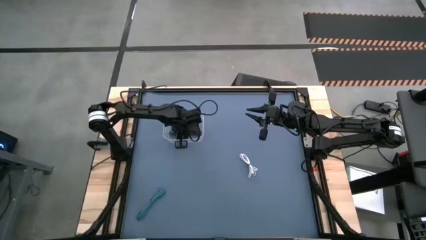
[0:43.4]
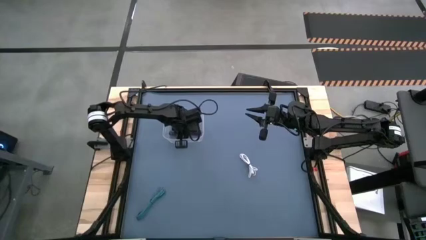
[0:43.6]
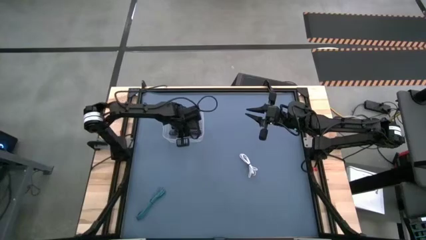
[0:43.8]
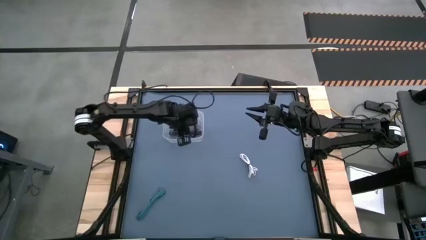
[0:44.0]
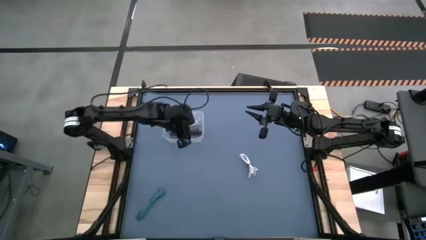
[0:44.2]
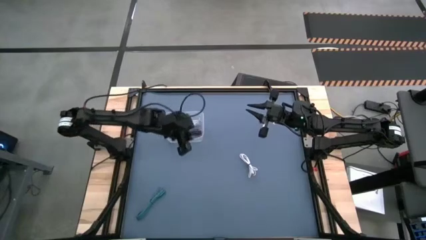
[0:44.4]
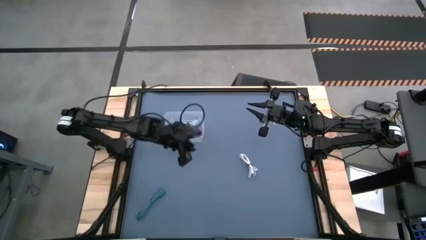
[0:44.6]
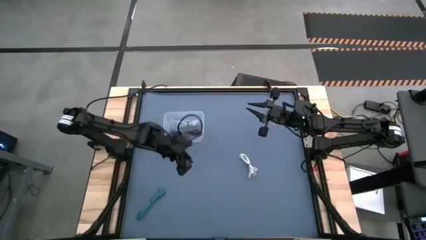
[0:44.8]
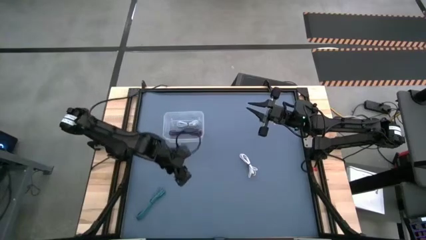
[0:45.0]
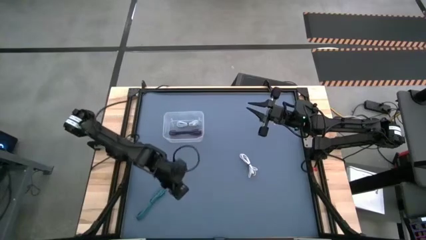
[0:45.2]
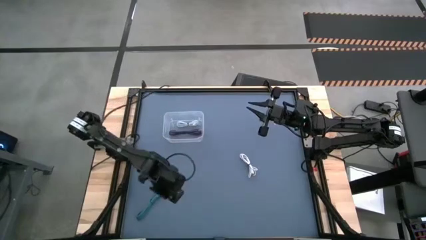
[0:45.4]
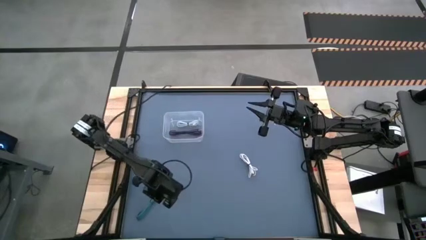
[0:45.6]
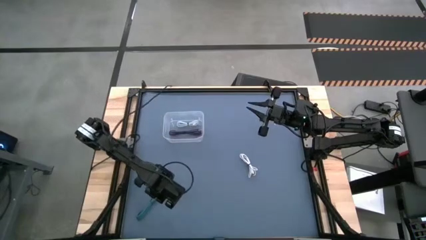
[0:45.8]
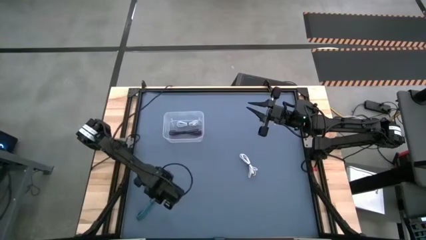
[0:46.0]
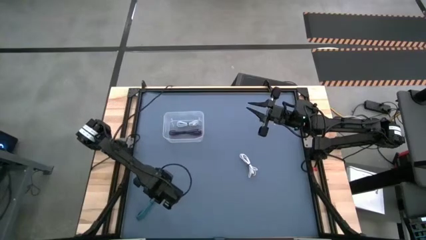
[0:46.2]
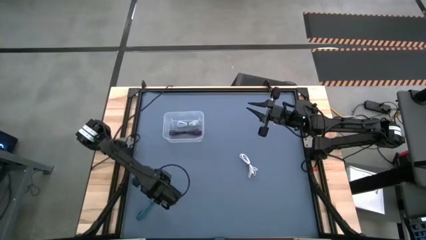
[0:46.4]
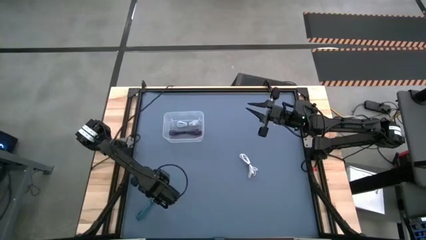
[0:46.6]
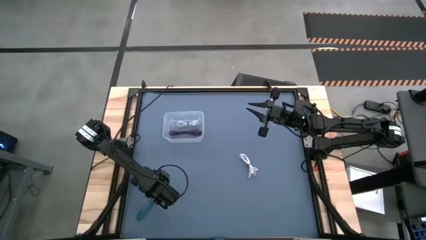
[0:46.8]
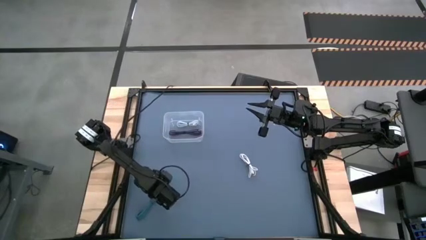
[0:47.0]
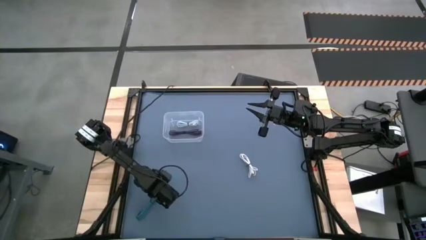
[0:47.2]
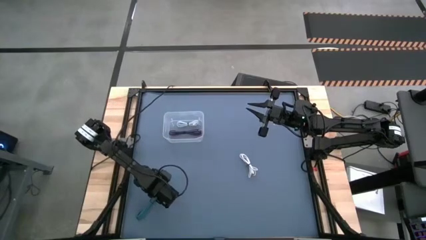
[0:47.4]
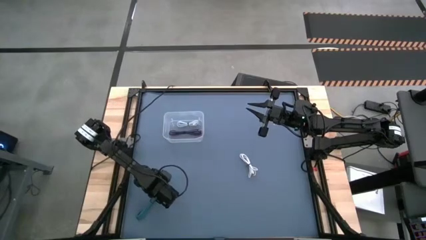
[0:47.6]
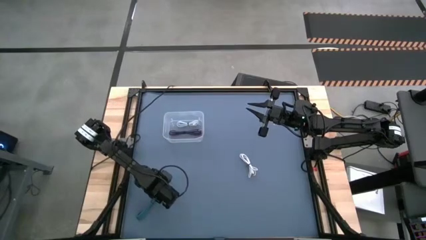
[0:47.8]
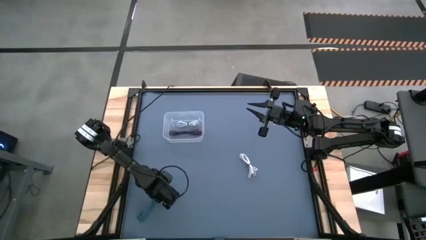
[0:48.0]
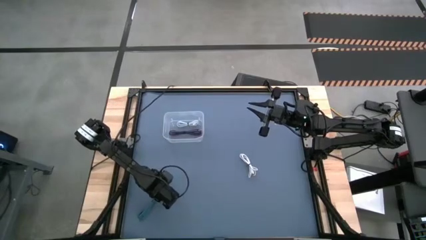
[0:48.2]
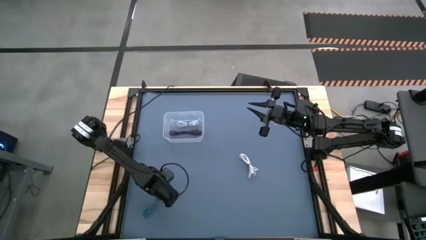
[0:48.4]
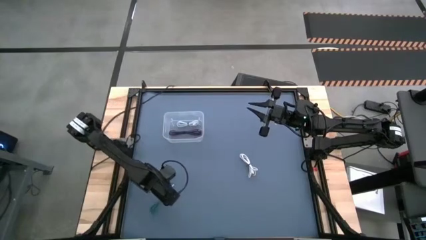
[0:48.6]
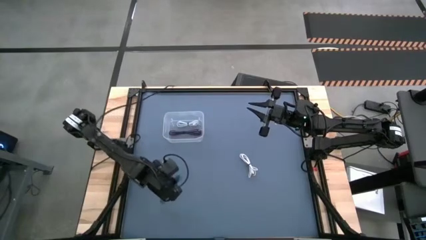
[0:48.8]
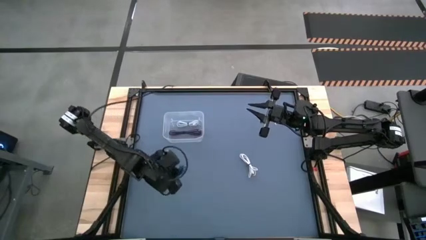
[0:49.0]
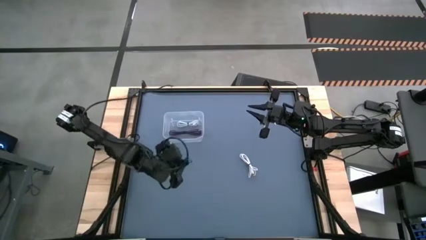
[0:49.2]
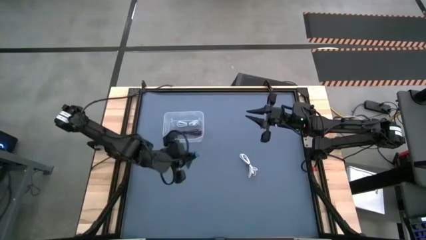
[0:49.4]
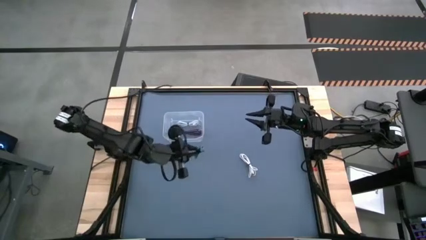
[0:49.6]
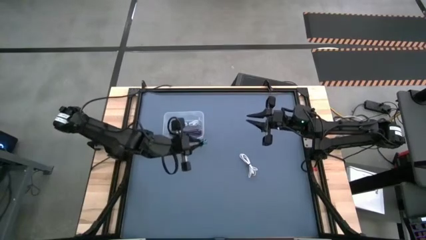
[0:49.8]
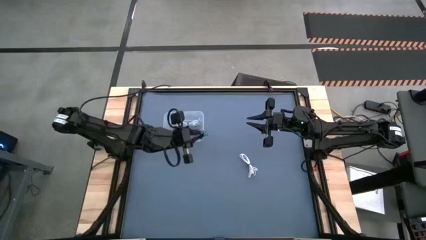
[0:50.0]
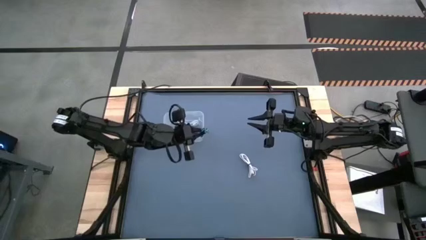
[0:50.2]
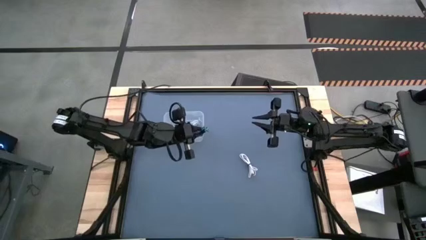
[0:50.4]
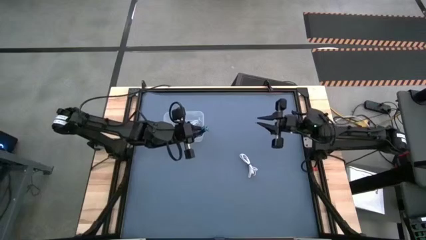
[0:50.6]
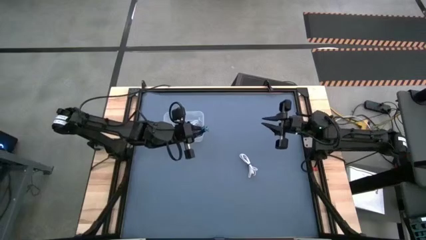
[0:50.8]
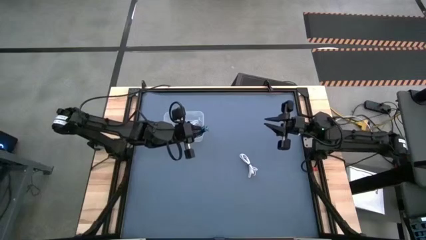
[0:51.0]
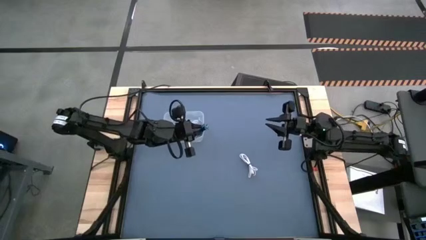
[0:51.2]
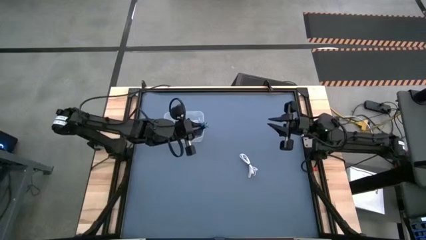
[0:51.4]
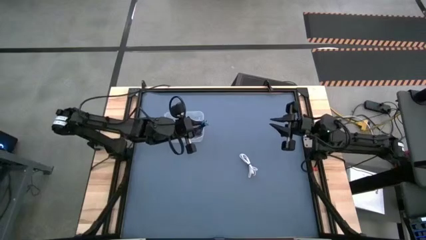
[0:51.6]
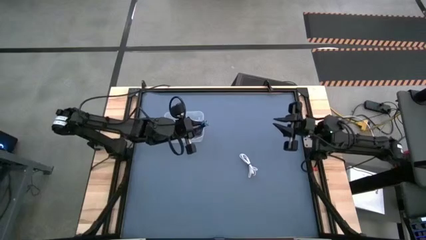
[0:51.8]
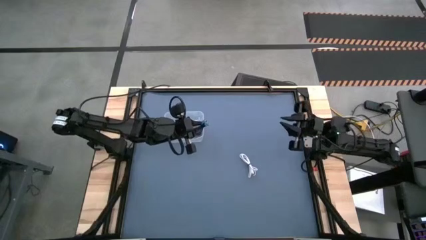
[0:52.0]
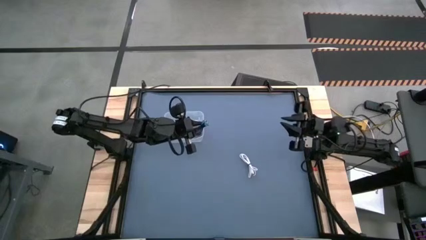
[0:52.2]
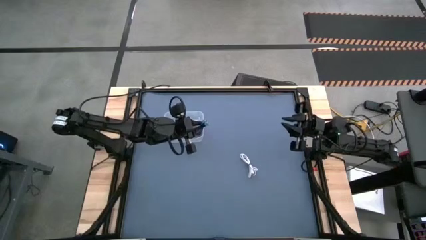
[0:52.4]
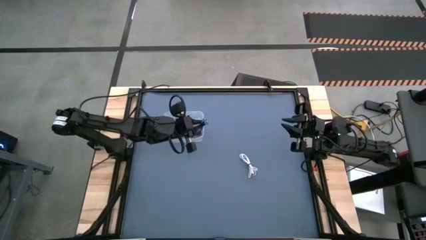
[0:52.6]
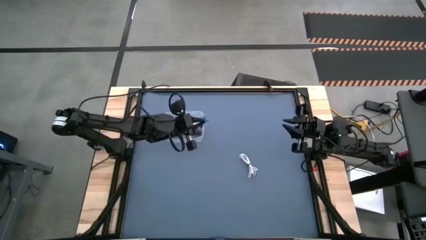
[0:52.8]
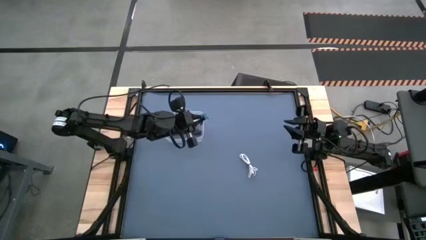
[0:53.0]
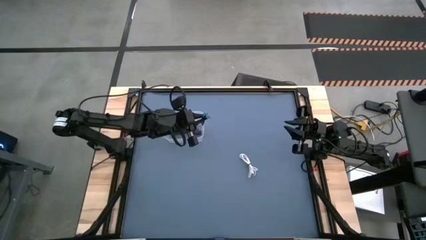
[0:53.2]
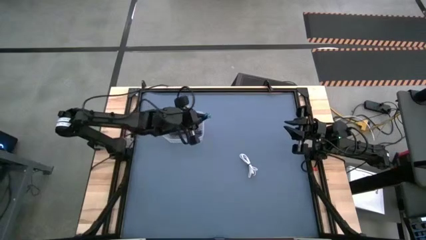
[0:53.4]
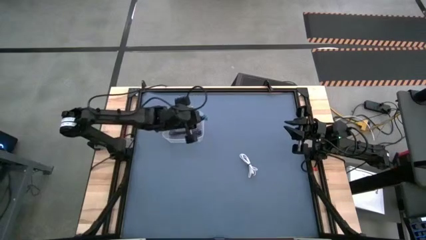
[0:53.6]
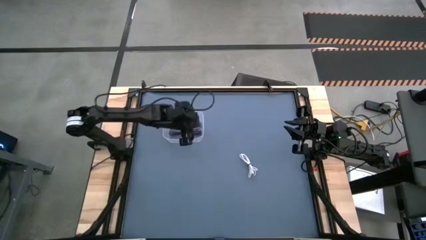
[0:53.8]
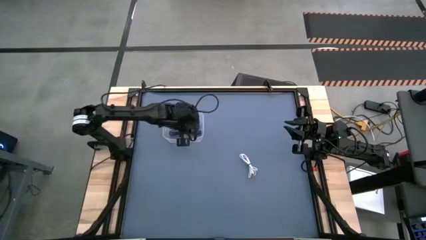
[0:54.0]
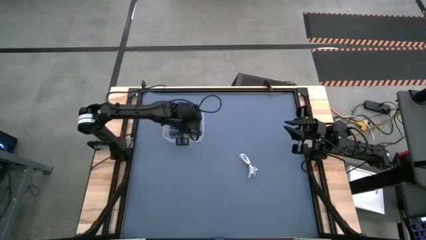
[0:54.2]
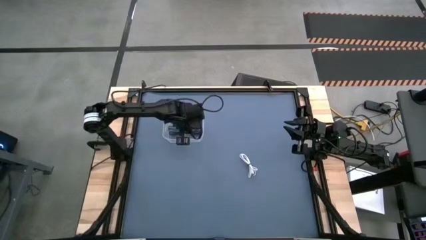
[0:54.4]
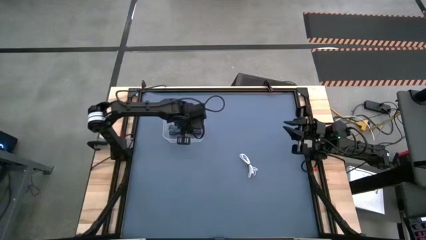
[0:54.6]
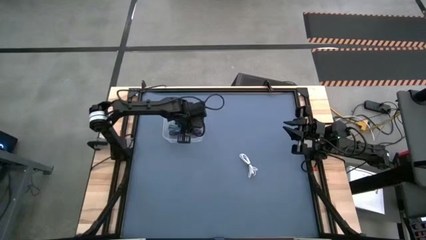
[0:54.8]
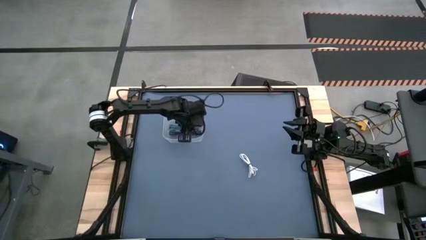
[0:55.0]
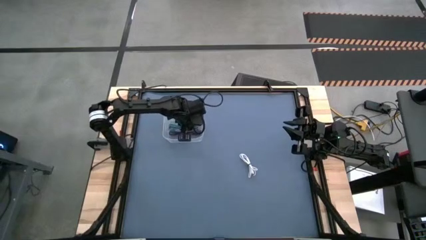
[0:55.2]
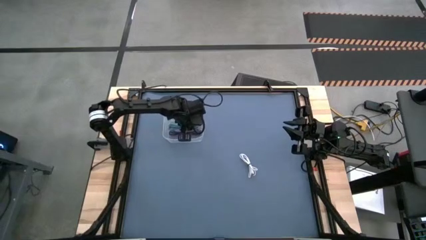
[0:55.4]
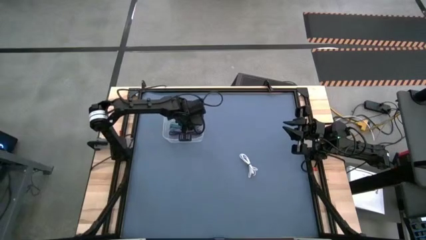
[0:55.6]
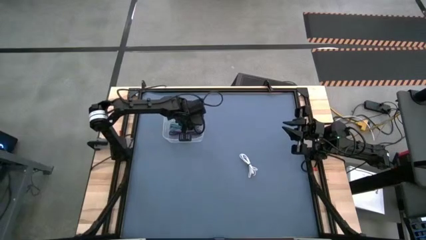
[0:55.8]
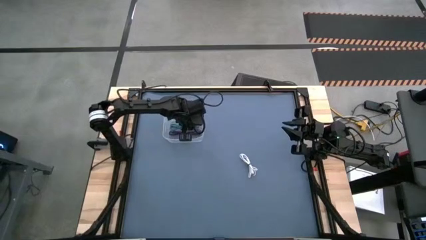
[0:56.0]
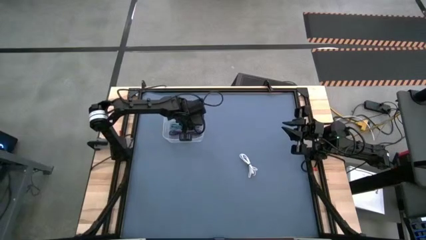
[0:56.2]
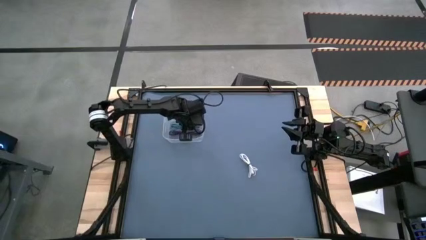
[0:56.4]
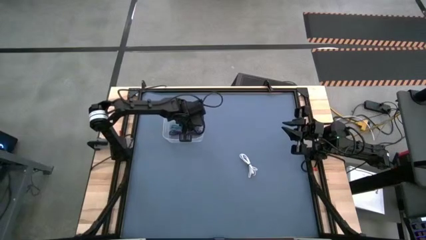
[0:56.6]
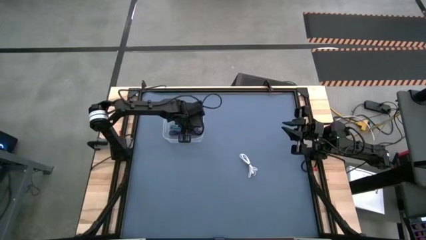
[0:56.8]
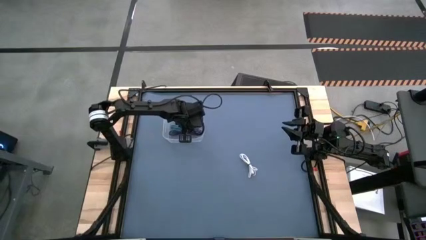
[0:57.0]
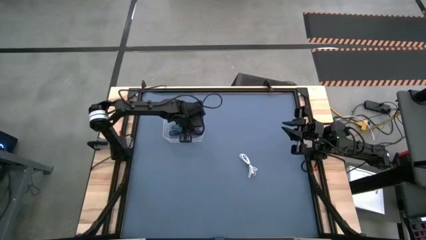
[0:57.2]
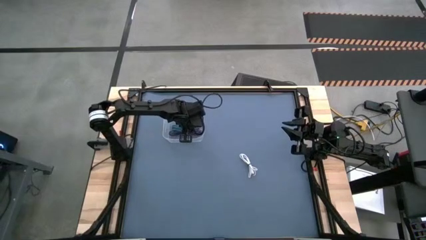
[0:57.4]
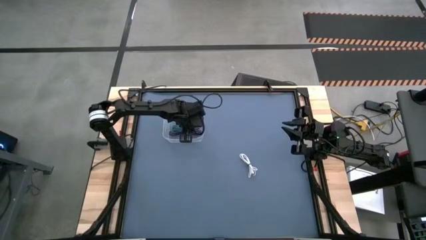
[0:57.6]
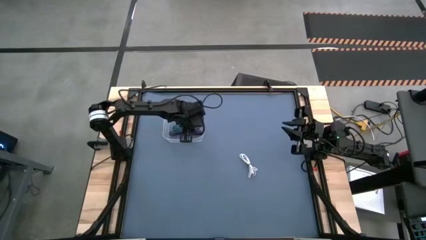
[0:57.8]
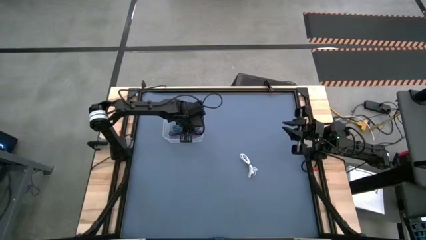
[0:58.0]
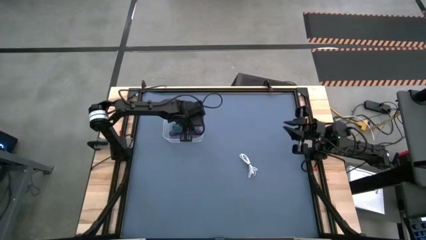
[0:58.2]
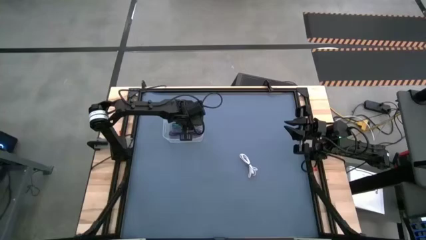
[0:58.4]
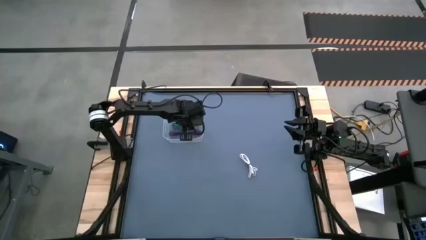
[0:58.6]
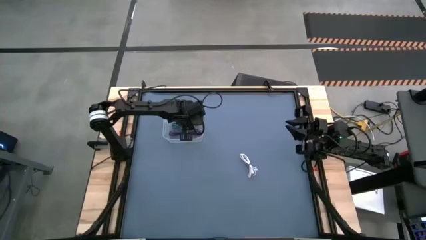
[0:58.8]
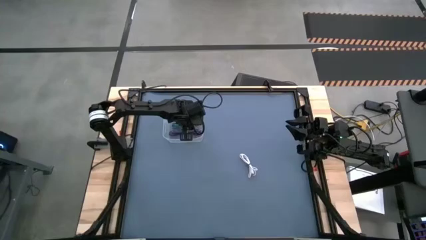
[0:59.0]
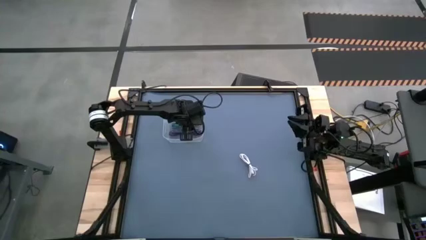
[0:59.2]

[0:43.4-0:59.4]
Task: Pick and place USB-C Cables
Put the blue charger cable into the bin
